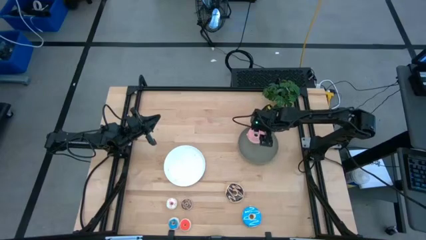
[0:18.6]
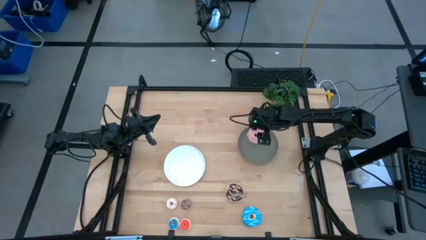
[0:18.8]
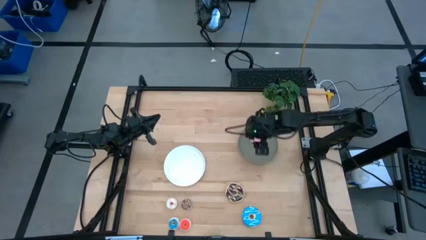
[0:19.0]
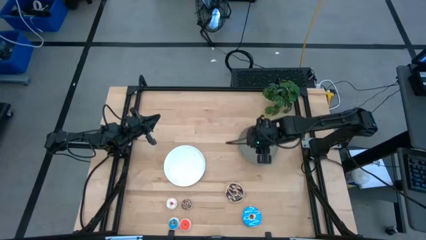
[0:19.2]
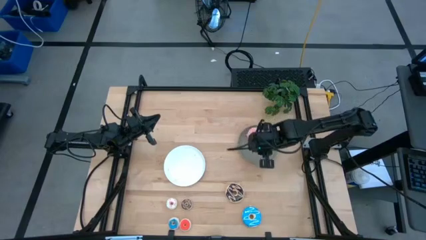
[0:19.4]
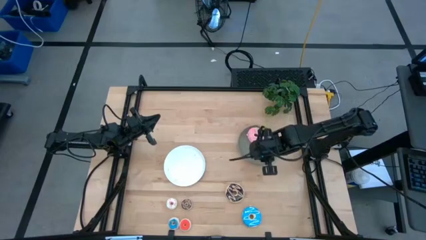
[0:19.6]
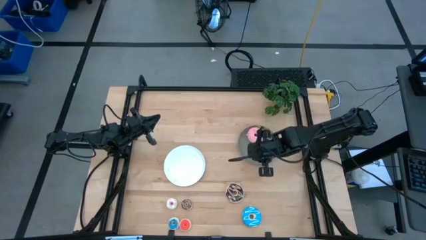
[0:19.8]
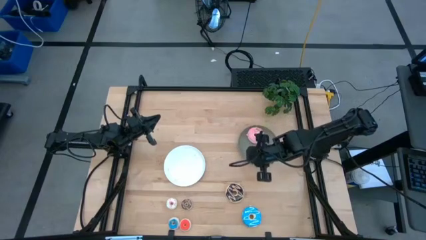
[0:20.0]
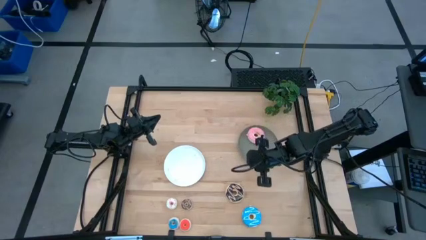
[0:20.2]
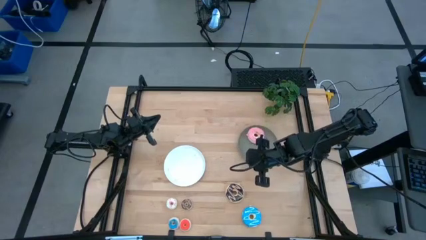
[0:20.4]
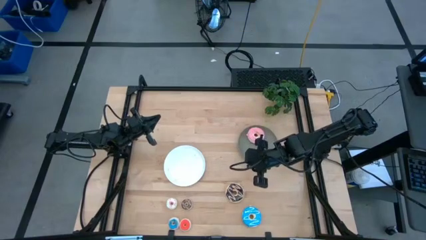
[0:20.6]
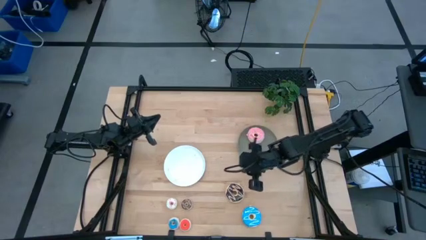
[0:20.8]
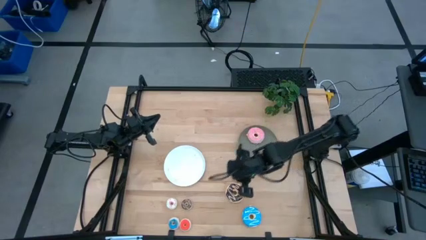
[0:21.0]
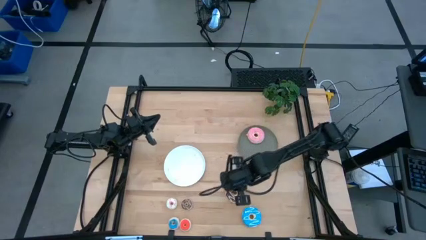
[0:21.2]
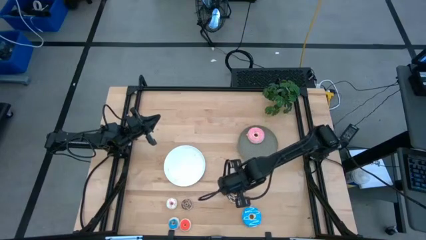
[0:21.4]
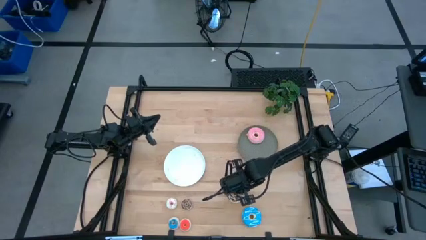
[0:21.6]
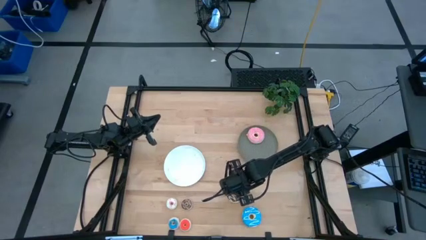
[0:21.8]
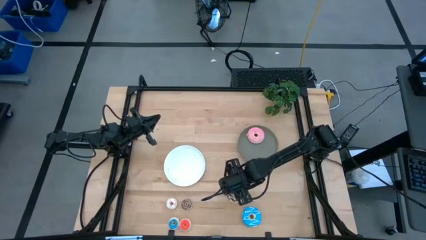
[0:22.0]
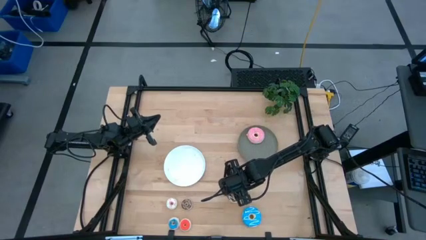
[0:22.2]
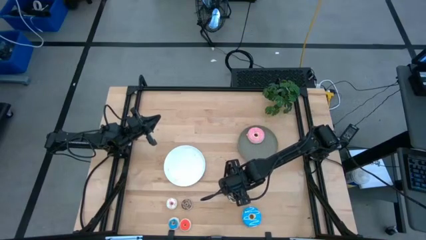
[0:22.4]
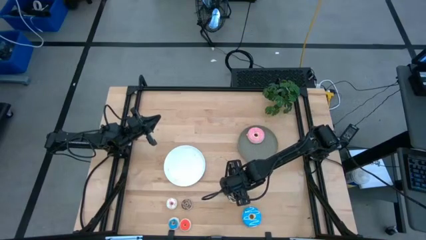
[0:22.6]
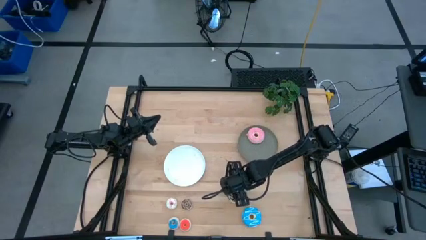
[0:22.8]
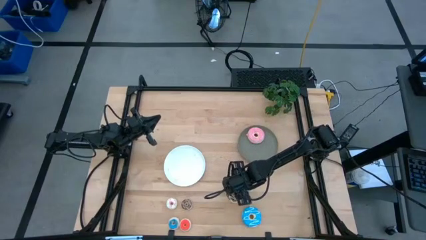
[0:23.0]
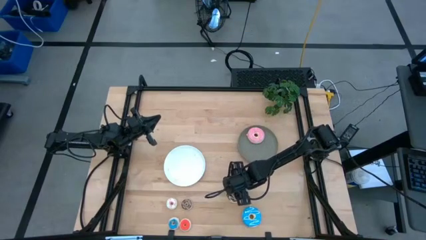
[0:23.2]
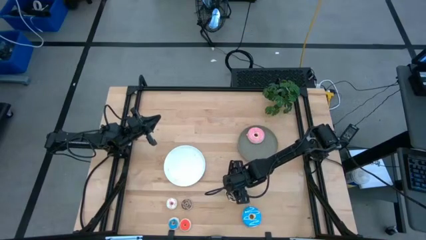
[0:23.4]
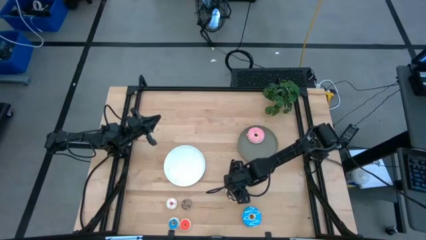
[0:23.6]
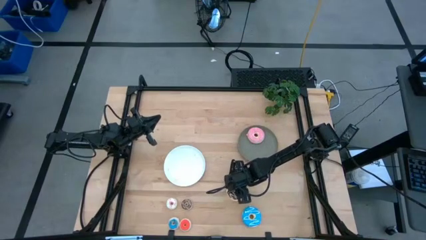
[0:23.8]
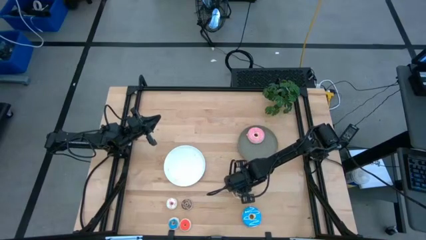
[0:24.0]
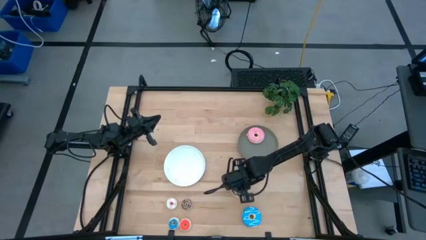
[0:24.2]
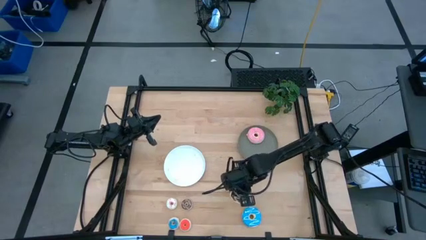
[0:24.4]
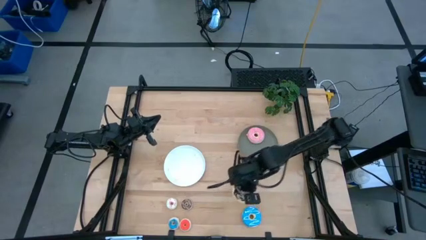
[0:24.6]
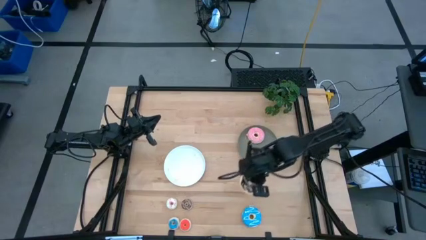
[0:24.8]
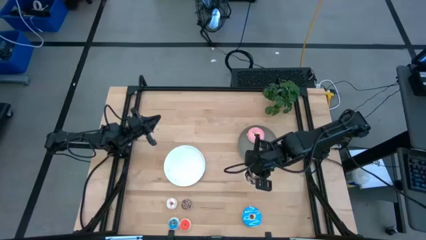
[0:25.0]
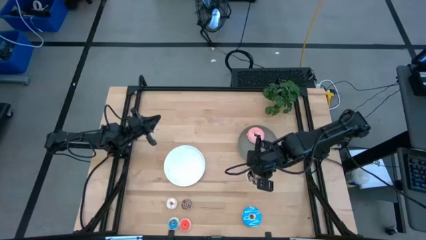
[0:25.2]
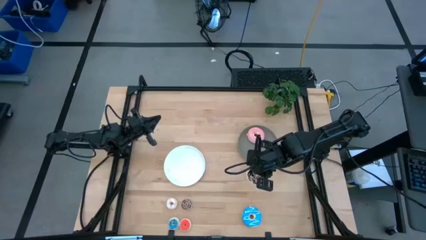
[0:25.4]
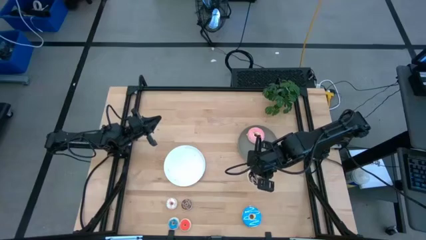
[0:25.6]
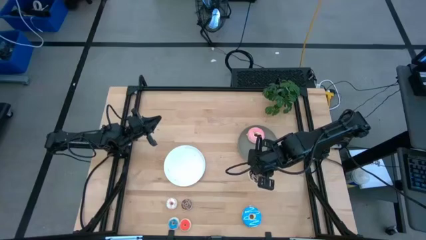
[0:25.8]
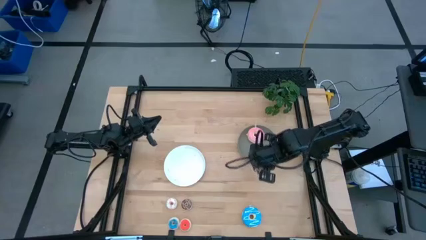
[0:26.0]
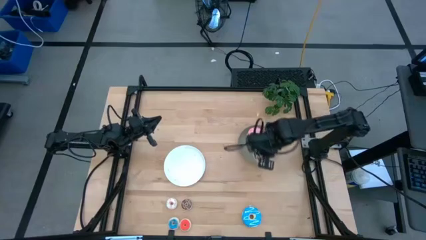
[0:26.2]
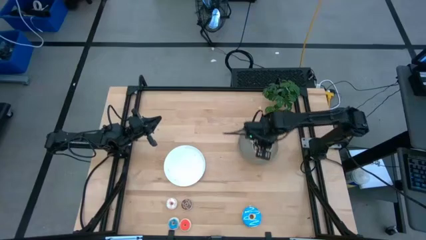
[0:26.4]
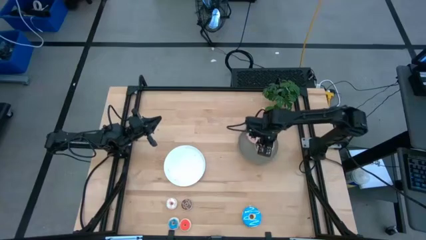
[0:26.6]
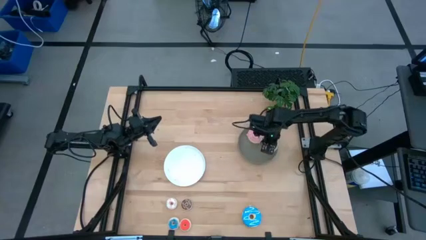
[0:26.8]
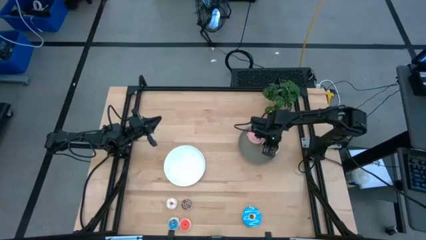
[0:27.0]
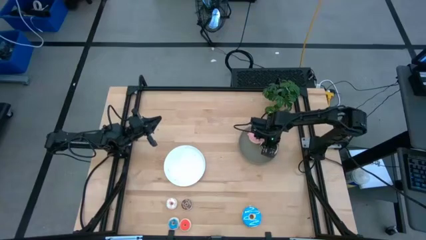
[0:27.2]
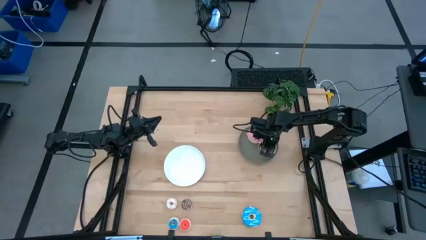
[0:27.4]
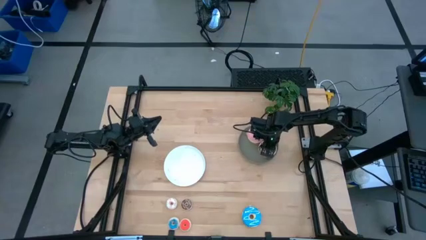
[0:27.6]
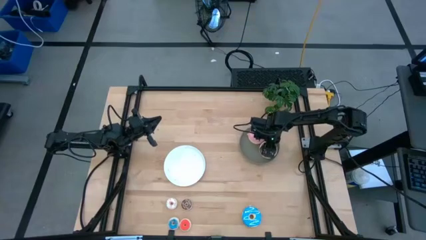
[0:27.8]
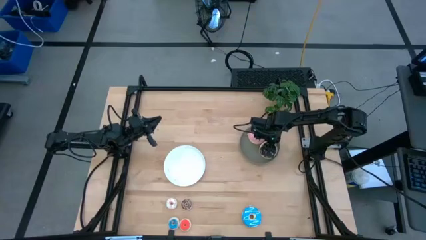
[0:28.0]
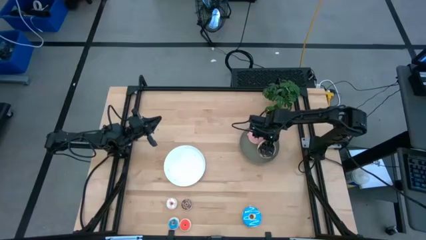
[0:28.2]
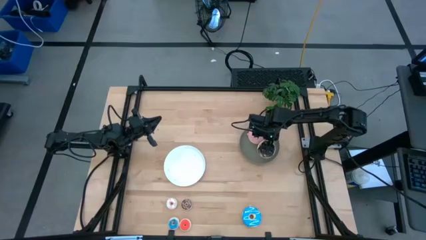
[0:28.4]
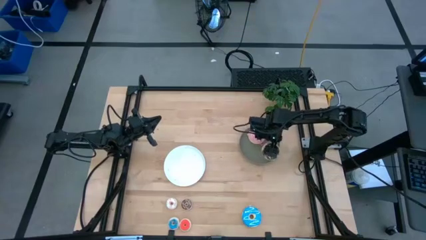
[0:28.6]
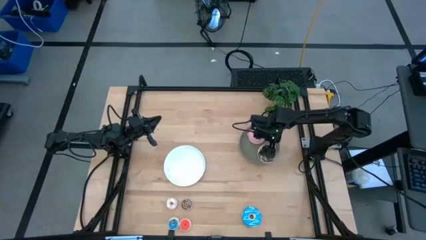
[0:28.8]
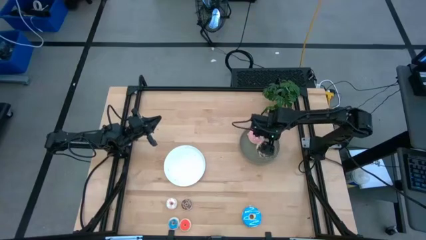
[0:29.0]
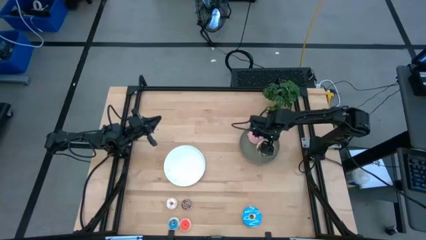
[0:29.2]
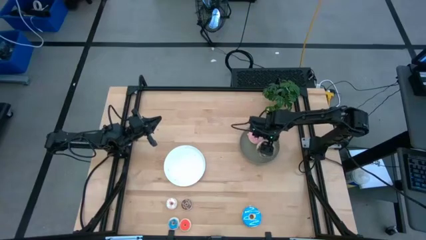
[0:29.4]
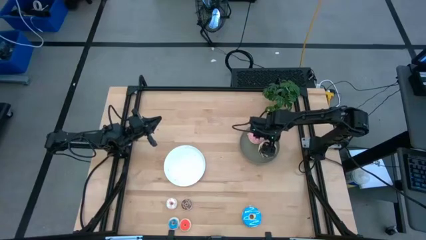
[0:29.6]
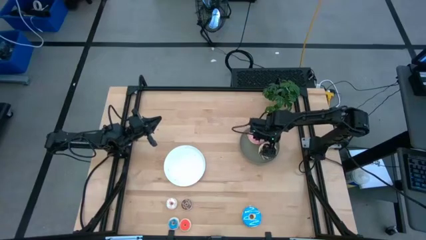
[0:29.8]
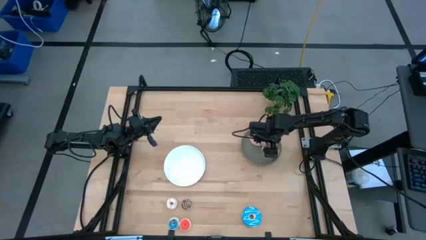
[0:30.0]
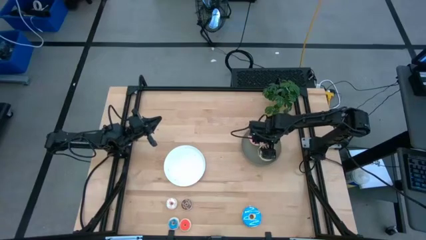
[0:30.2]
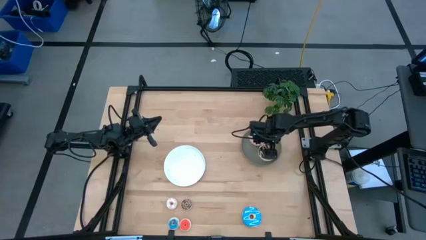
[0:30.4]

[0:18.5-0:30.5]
Task: Pick & Place donuts
Put the big black donut on the gray plate

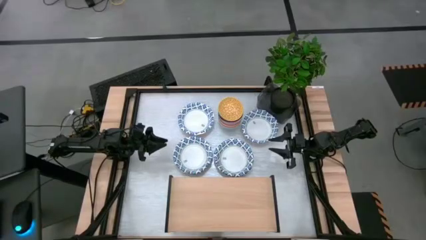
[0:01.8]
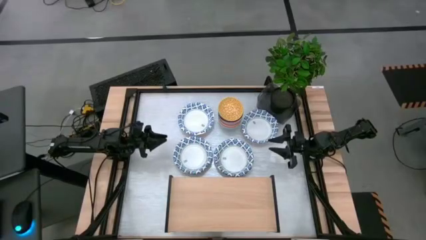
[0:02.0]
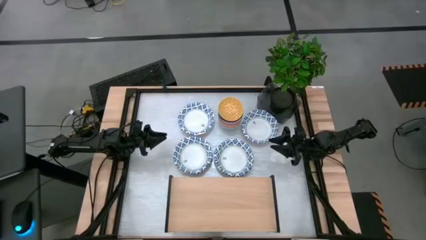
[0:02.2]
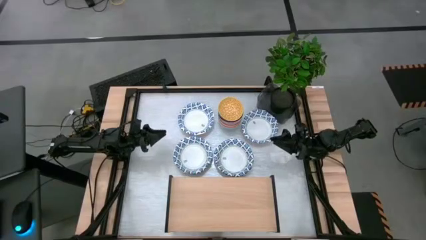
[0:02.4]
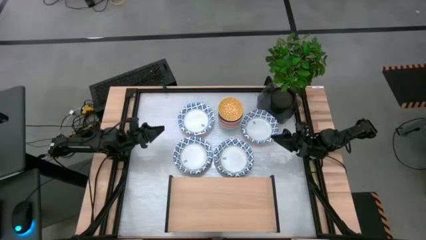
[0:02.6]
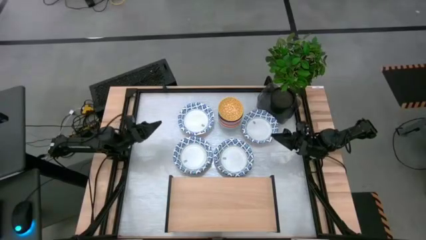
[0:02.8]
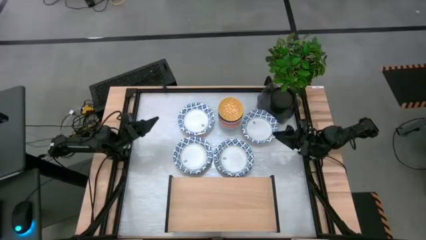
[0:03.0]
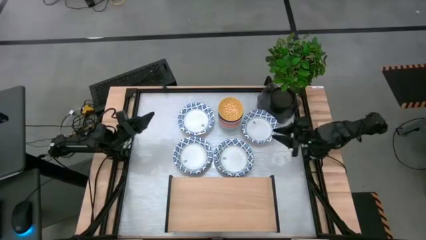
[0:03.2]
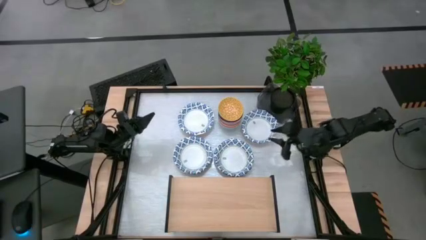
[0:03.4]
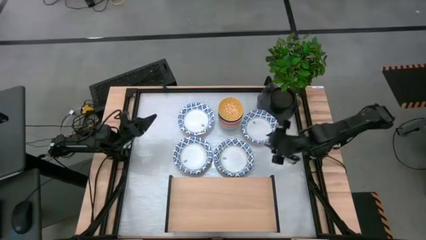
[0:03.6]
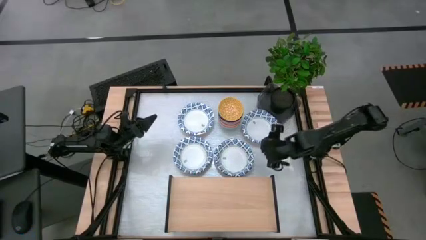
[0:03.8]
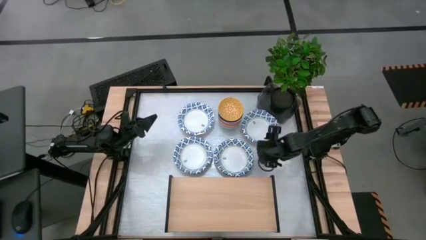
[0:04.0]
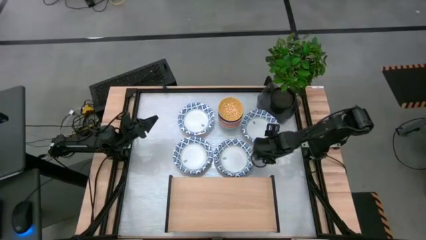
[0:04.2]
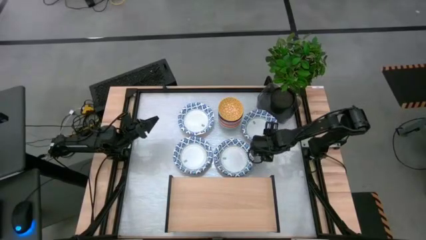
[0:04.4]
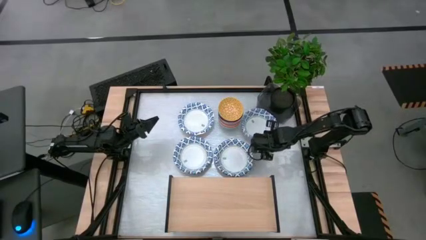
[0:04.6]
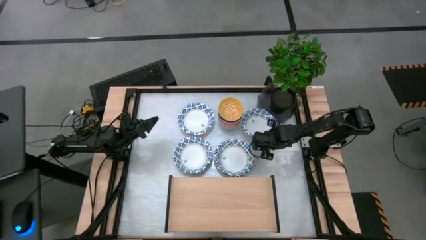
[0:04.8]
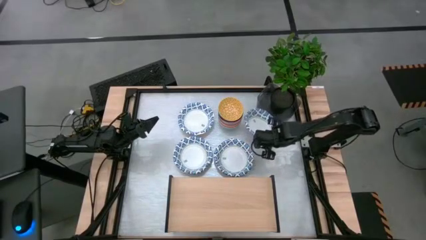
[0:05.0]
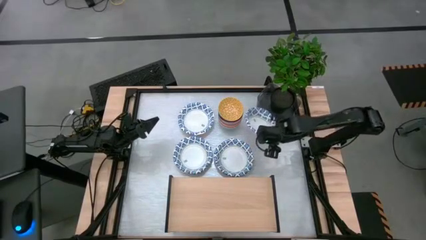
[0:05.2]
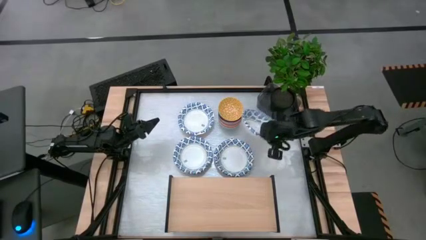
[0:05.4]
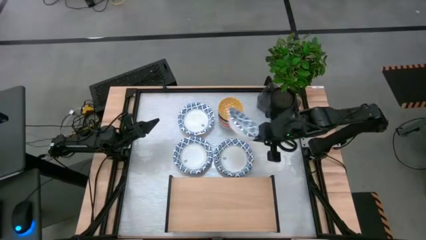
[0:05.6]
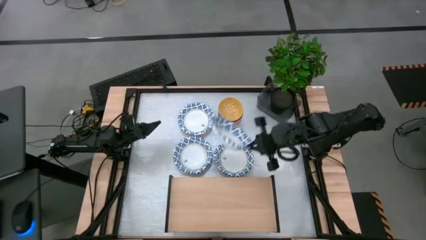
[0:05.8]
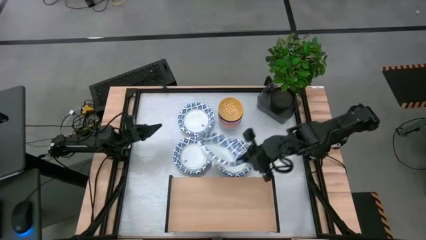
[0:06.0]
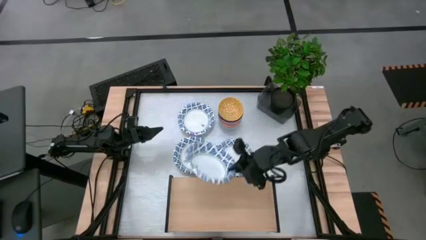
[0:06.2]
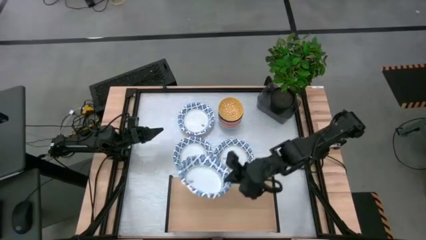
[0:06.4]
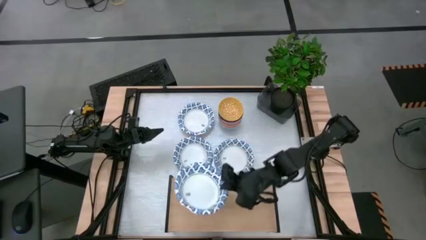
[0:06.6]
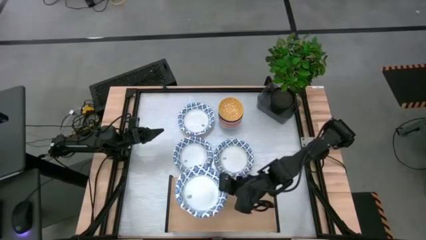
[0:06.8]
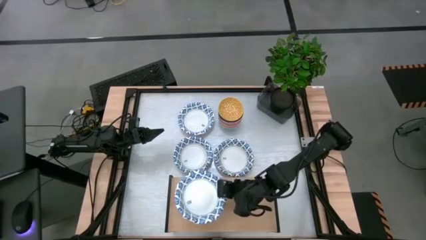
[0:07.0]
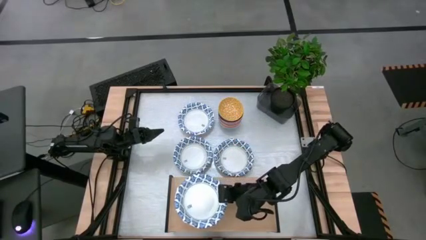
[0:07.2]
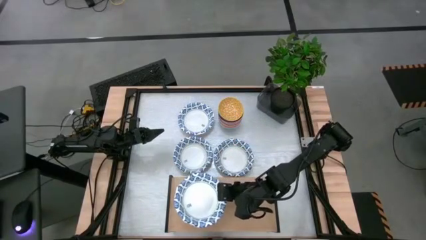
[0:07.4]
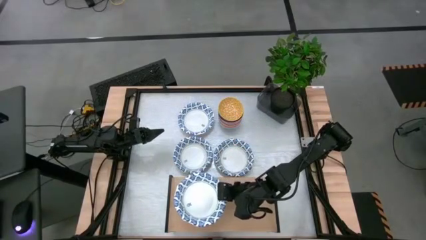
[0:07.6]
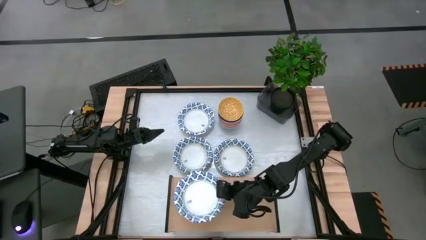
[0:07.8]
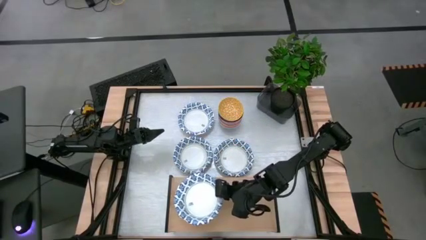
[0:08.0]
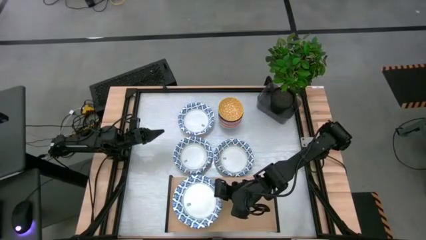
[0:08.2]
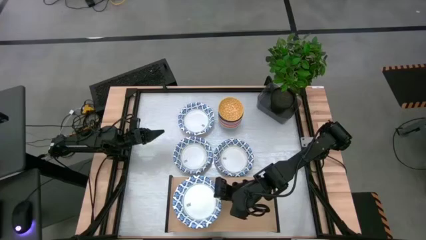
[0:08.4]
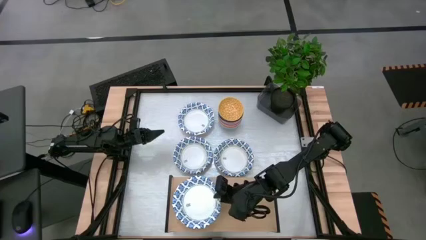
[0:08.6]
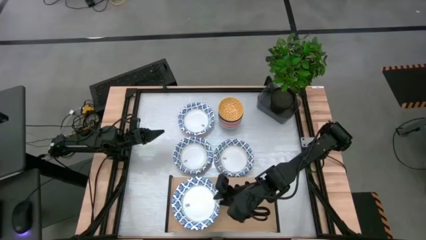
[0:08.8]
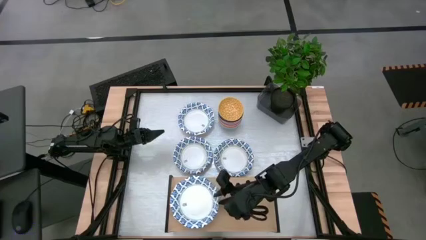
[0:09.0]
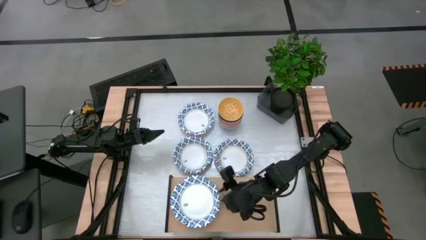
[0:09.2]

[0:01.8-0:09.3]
Task: Place and stack plates onto a shelf
Put the top right white plate on the shelf
